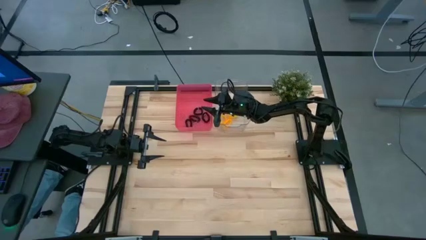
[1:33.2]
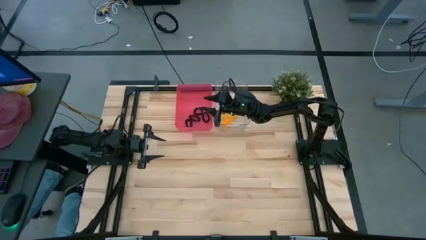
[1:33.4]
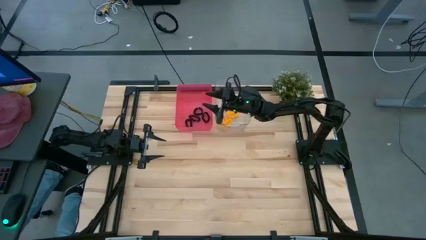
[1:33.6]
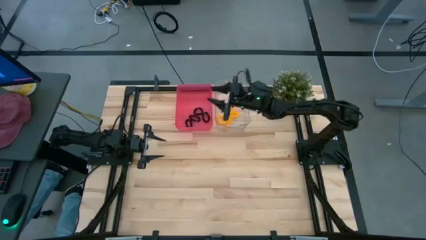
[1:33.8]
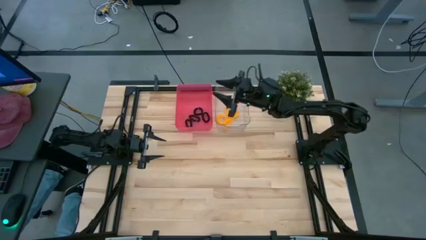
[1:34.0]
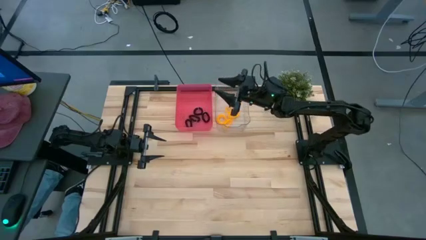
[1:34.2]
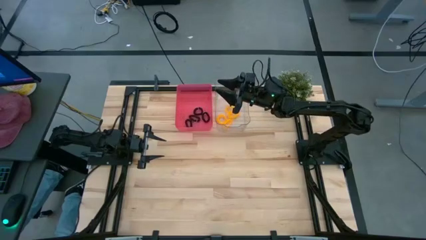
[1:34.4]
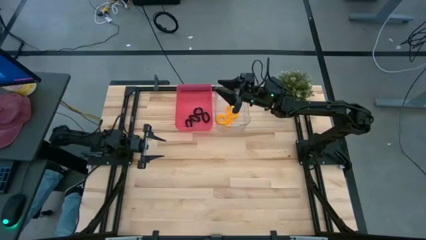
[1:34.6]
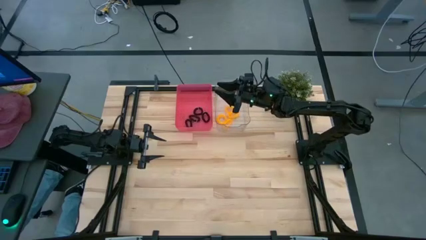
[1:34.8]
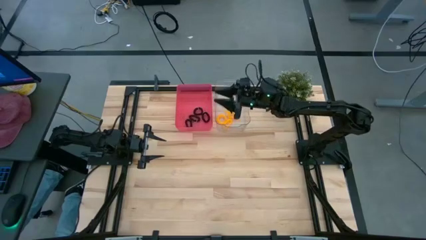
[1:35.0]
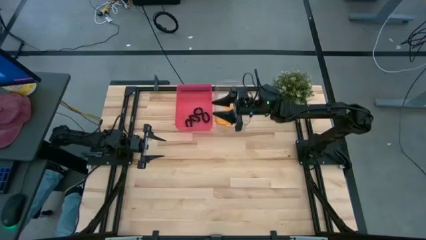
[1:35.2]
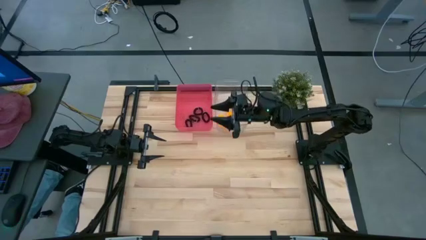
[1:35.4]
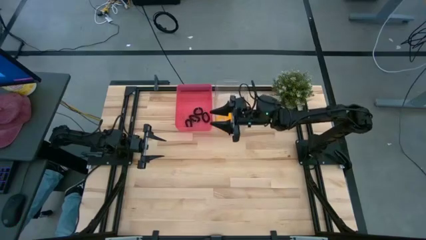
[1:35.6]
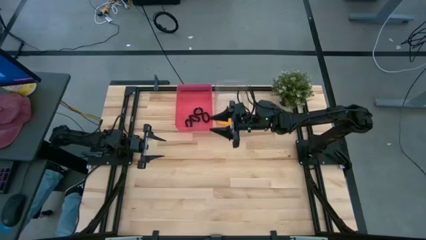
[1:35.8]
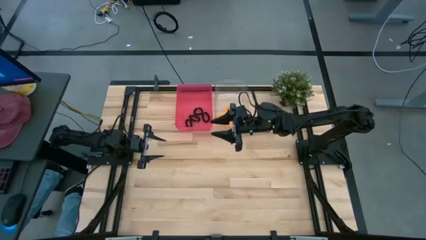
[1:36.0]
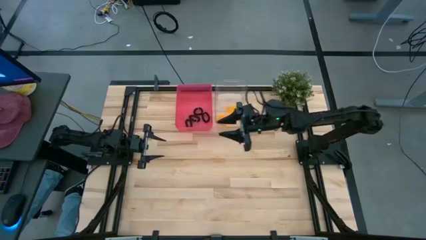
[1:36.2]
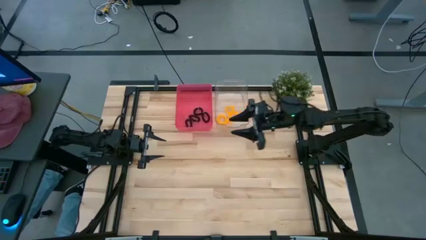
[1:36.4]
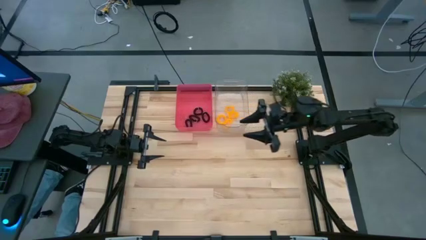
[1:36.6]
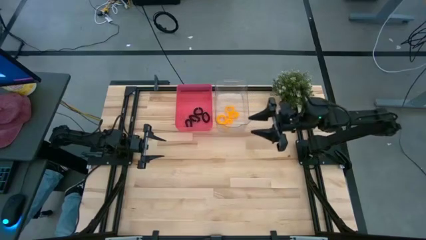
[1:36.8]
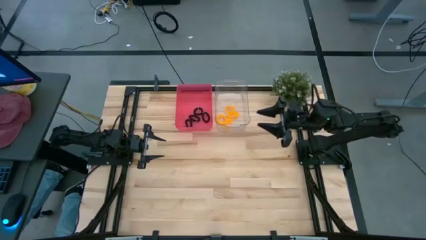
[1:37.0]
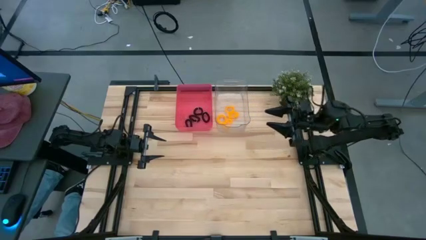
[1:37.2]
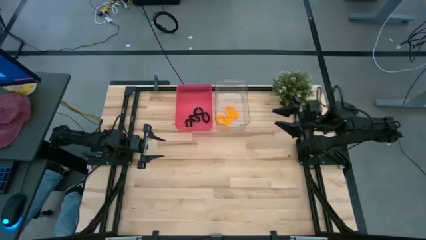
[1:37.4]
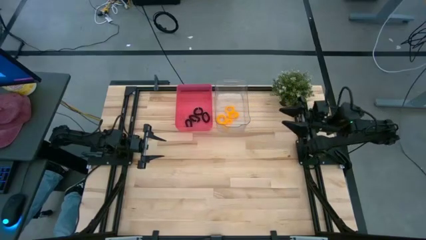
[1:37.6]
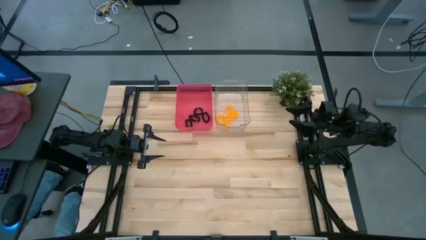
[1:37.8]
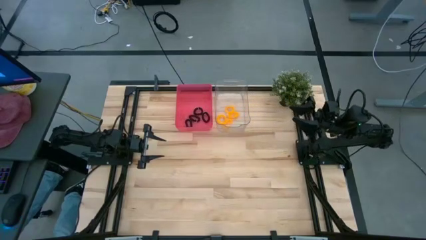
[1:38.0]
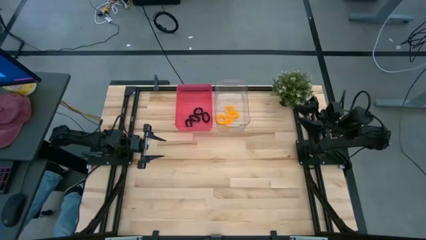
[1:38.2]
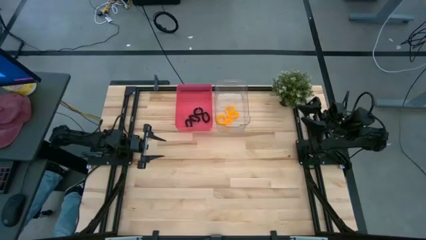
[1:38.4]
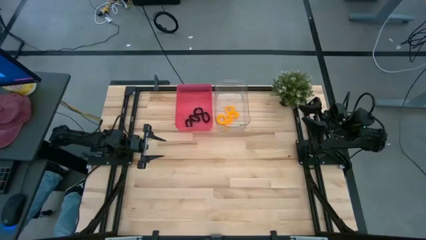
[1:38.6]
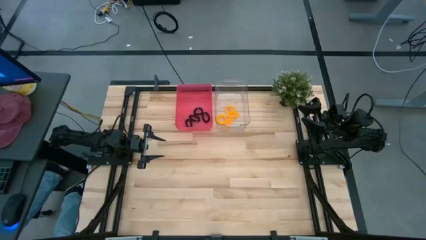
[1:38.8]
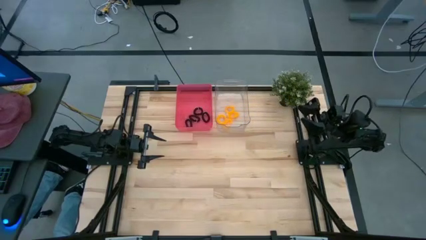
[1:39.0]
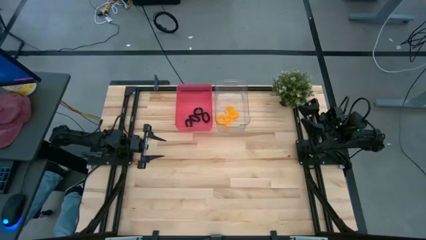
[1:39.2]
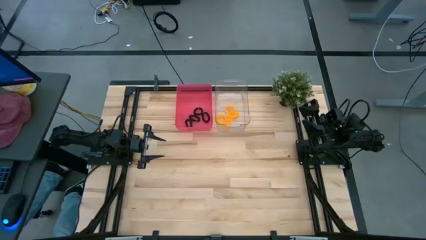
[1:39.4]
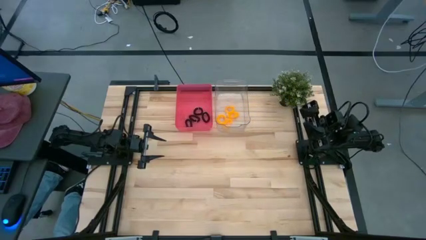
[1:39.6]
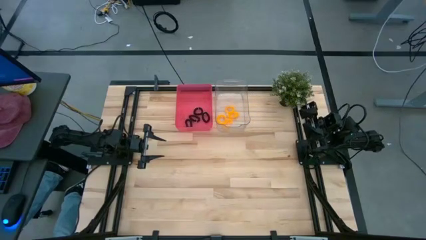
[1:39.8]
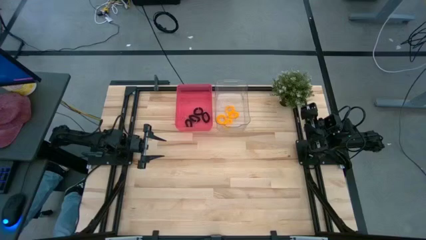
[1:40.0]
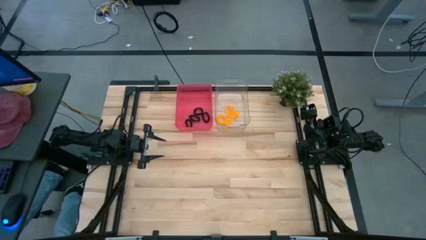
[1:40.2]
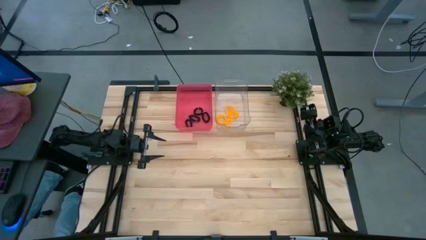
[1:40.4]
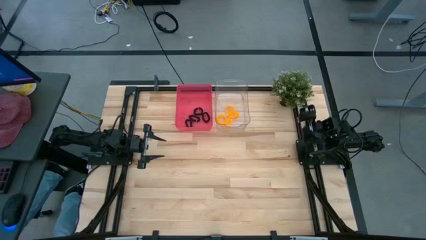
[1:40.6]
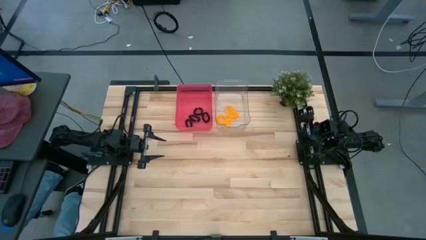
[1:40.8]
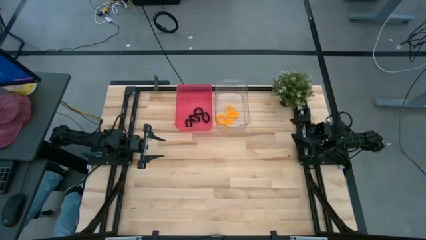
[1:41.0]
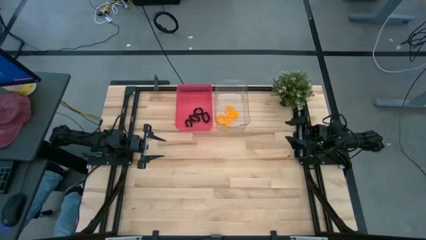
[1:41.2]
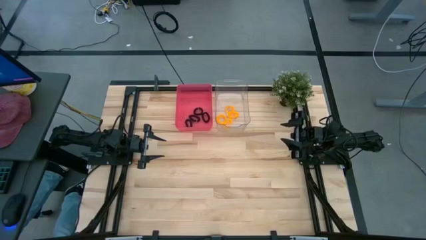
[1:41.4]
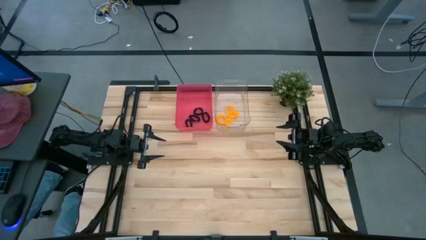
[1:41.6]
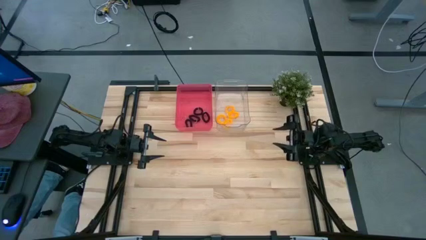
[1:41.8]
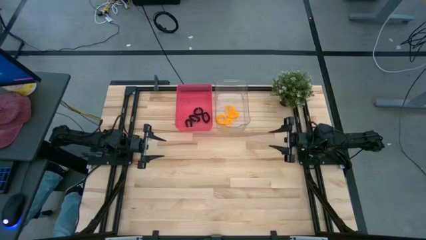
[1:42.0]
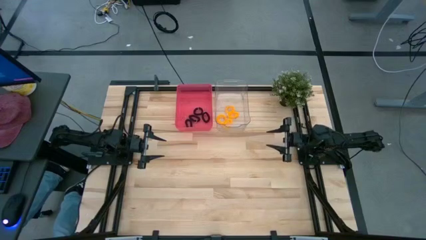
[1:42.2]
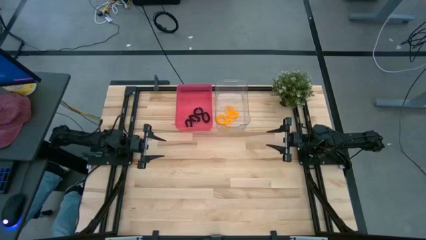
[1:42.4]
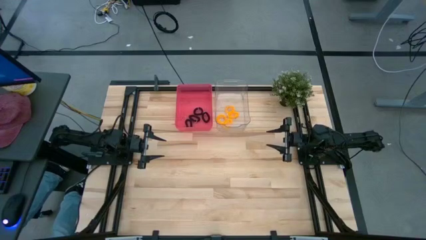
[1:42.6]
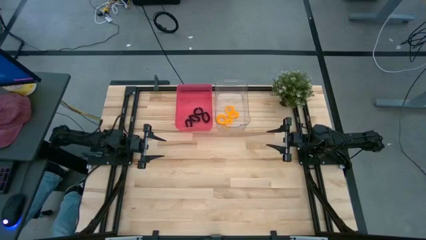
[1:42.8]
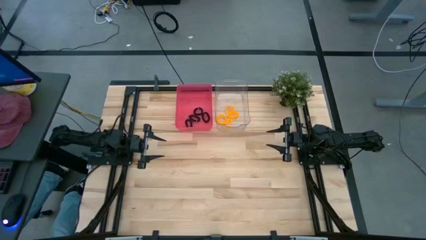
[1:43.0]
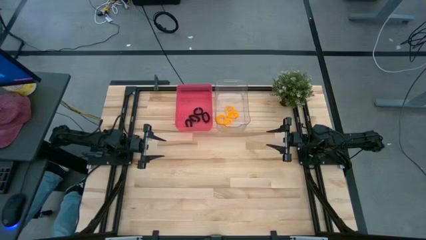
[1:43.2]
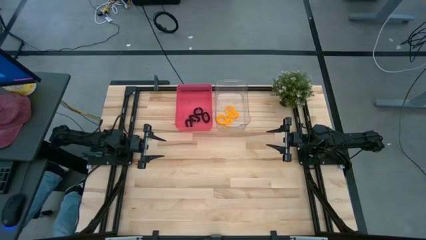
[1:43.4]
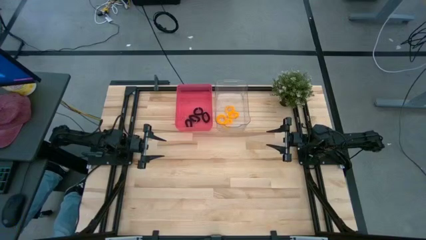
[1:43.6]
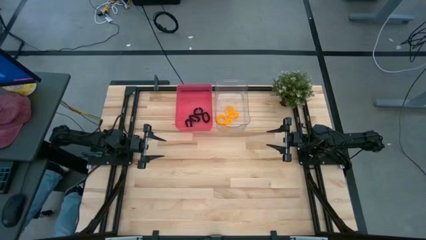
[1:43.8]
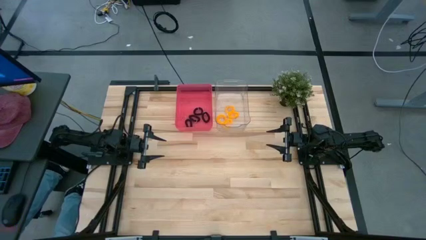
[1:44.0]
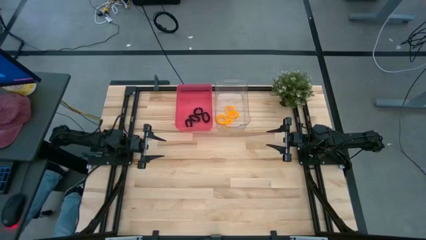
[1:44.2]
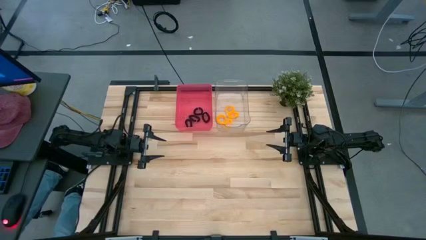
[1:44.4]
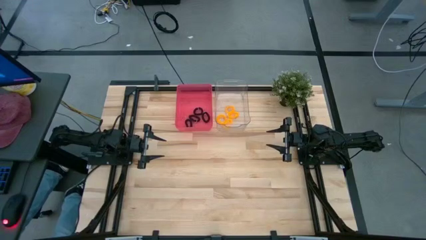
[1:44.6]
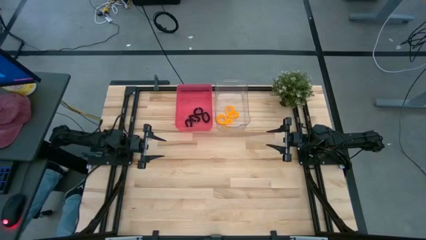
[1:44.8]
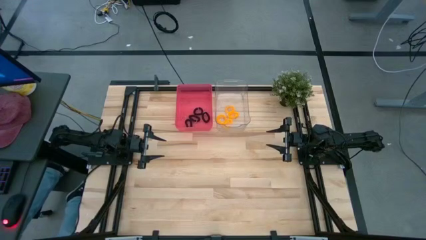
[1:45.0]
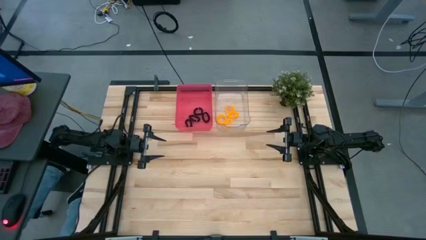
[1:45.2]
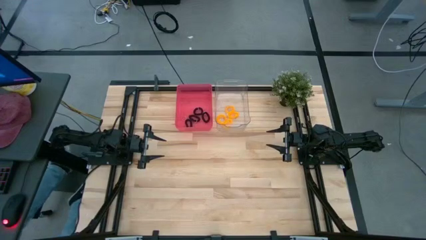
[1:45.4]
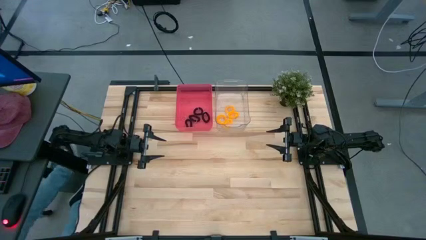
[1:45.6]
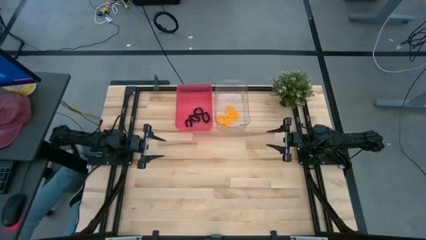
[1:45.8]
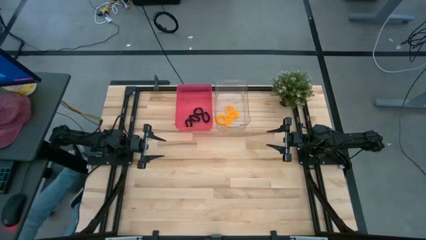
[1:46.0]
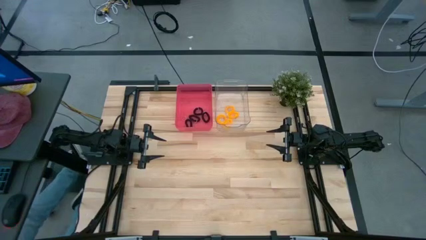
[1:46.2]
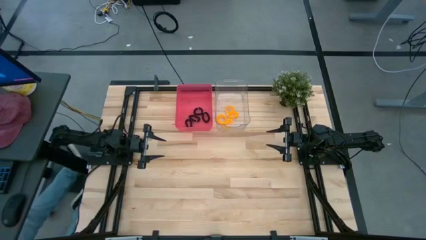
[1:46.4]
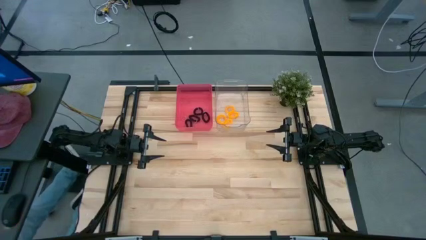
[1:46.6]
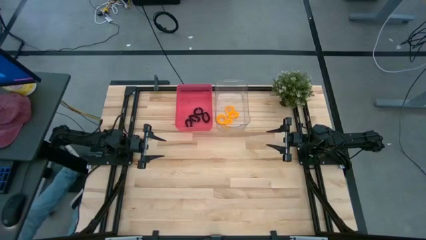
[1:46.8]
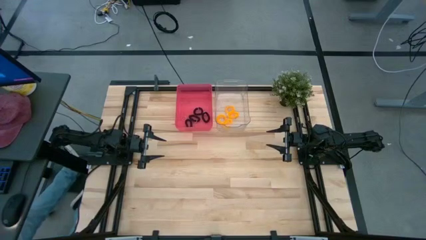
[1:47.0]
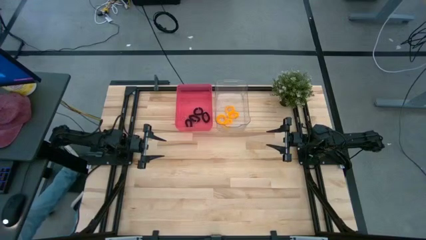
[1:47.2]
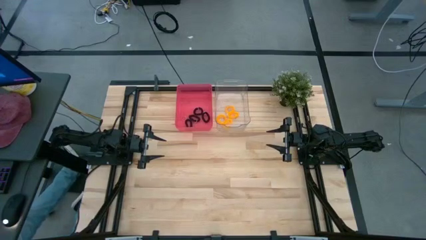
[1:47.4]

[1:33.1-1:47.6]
Task: Sort spring keychains
Return to Home Position

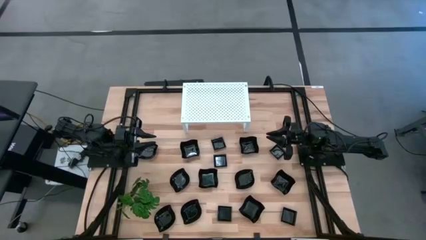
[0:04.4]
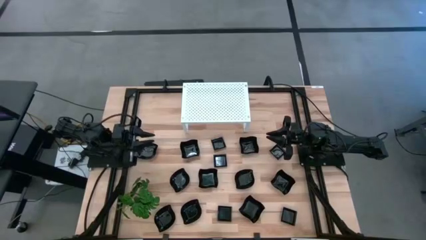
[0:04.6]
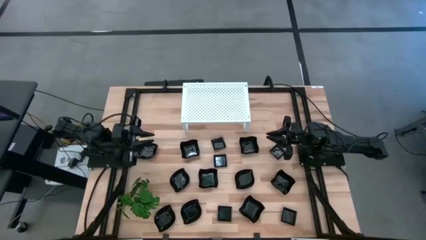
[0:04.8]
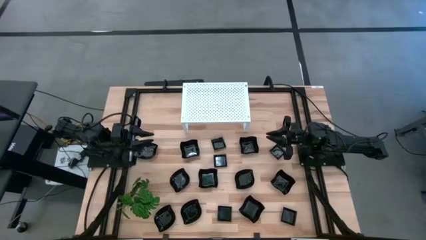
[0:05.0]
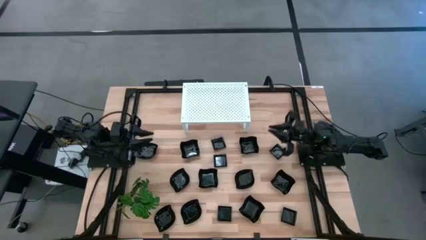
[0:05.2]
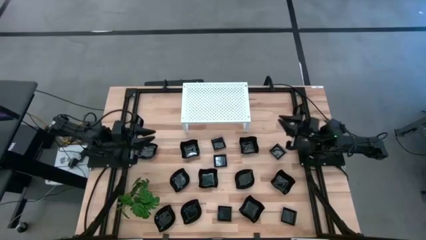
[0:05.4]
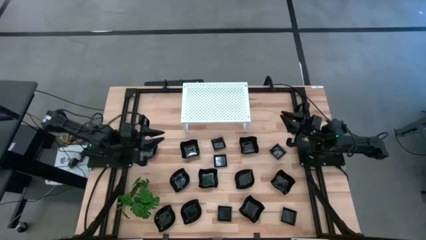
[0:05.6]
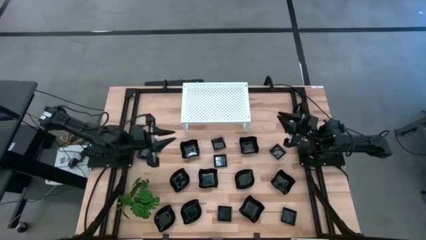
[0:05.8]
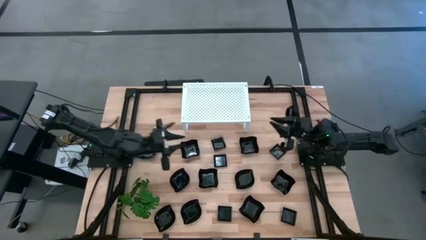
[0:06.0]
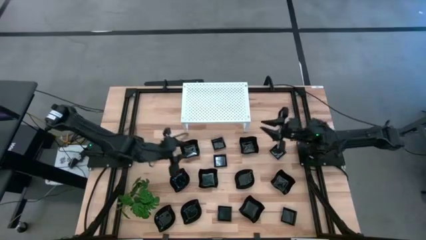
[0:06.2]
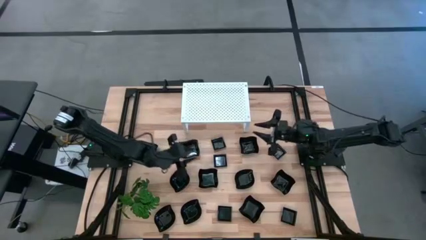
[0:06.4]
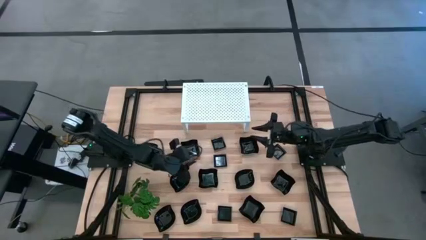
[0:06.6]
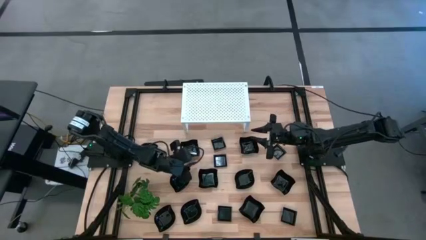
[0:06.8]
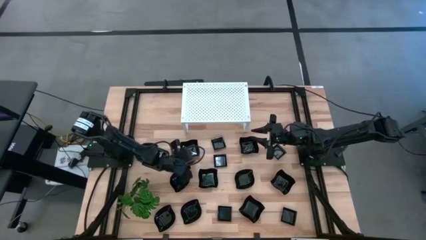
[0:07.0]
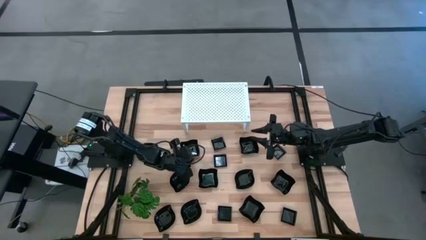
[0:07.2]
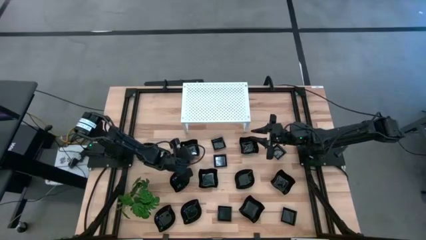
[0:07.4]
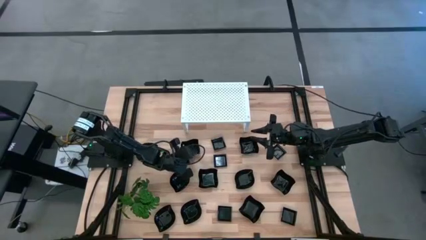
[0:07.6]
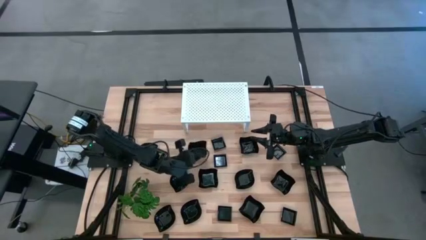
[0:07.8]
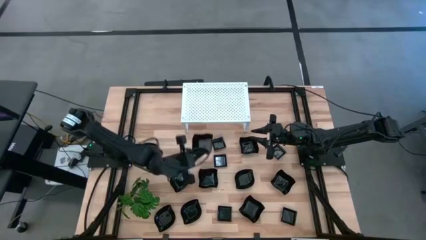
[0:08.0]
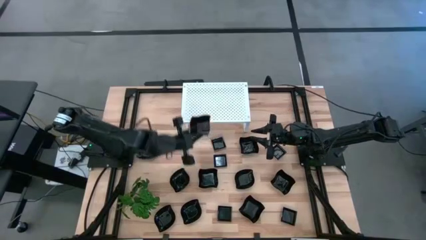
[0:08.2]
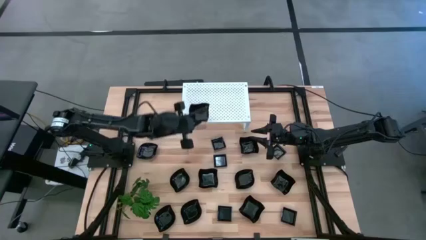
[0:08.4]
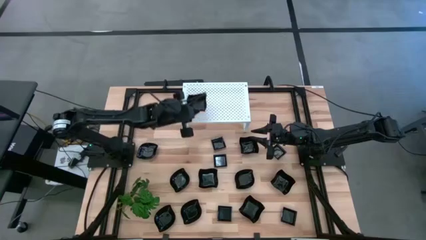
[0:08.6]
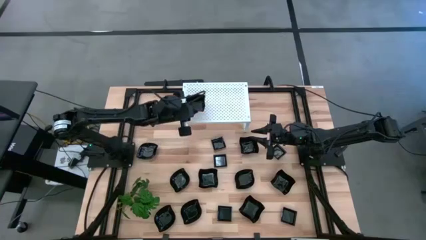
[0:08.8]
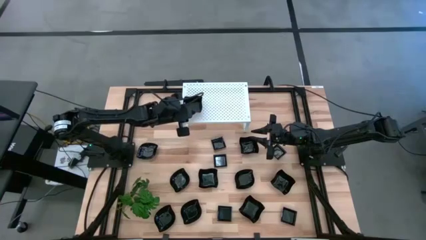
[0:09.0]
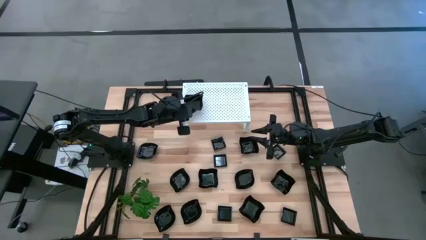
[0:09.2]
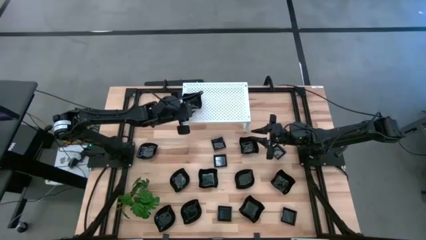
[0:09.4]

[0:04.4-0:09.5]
Task: Pick & Place Mini shaped plates
Put the distorted square plate on the shelf
